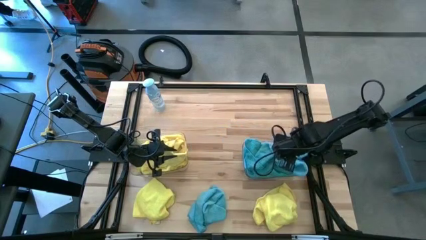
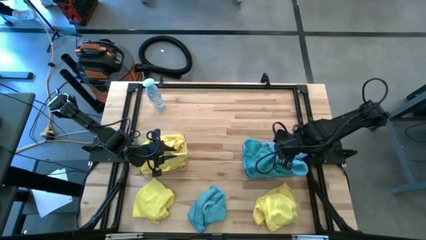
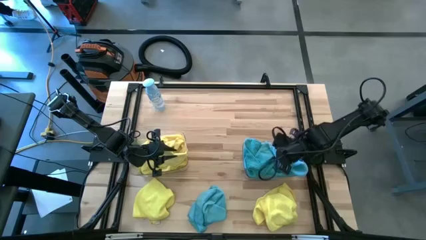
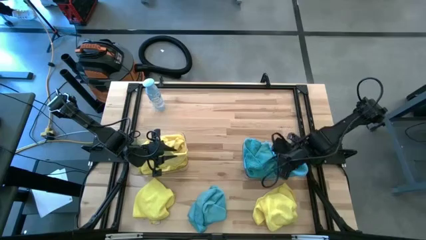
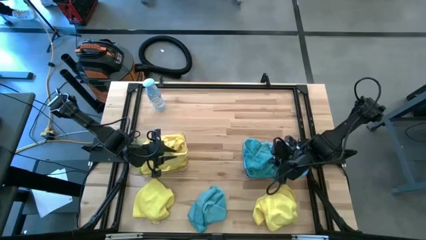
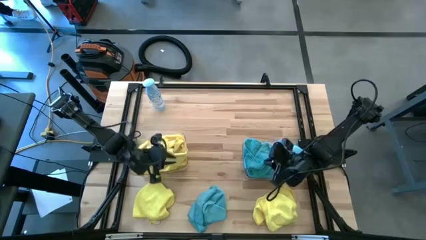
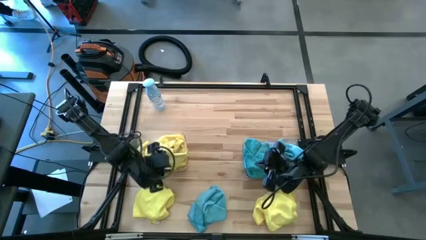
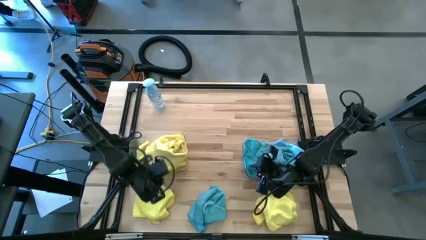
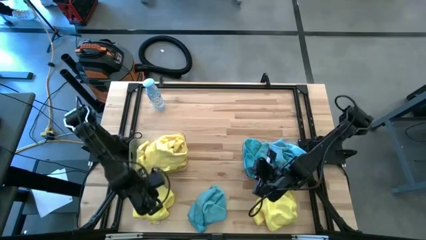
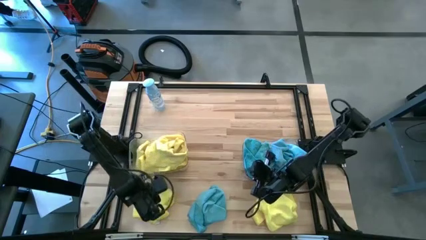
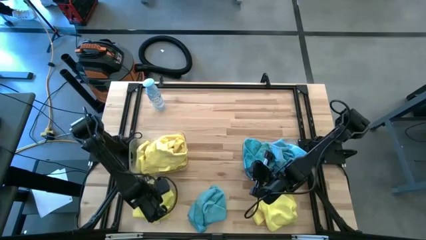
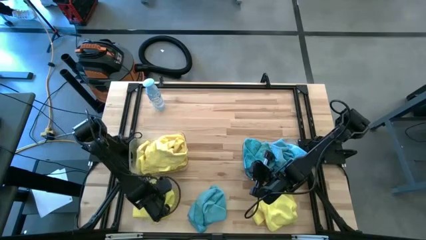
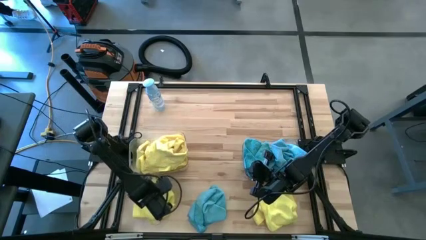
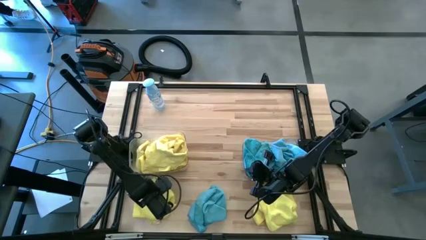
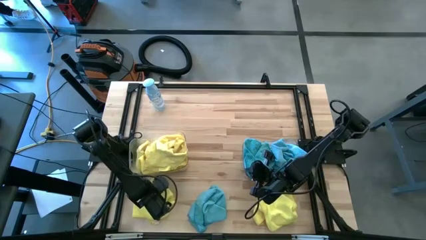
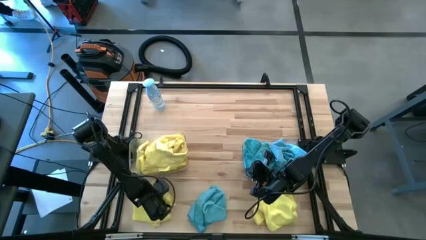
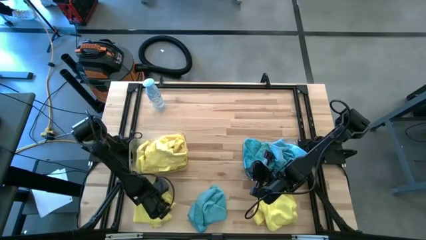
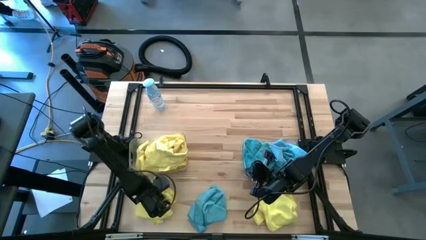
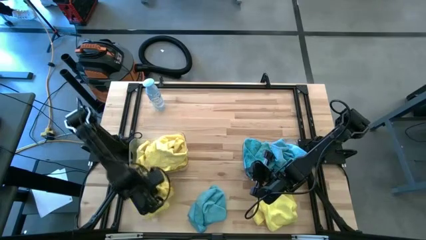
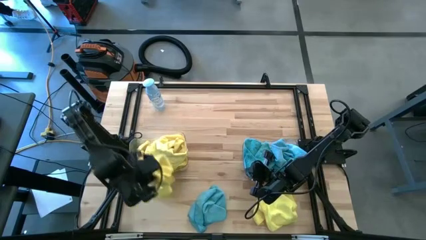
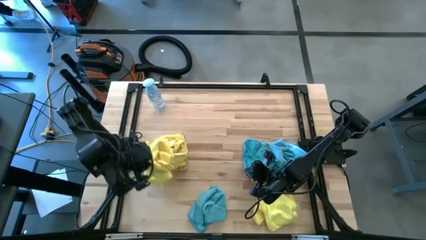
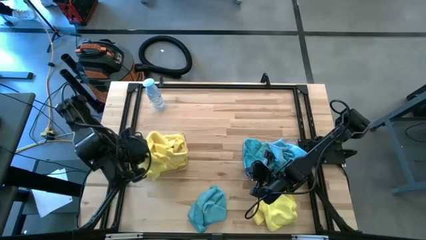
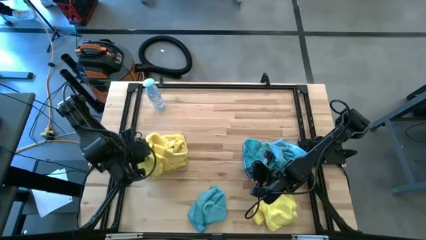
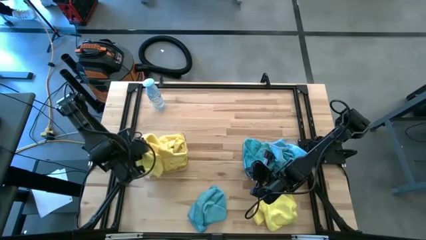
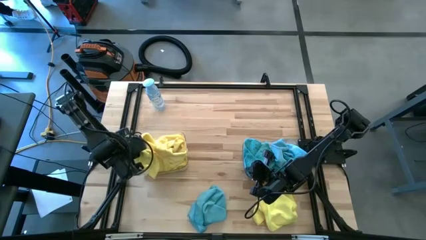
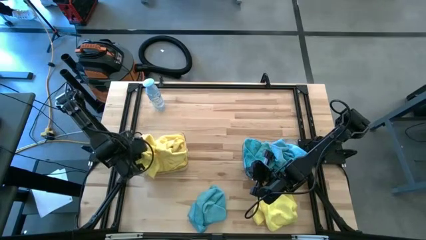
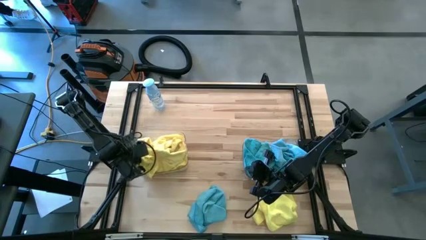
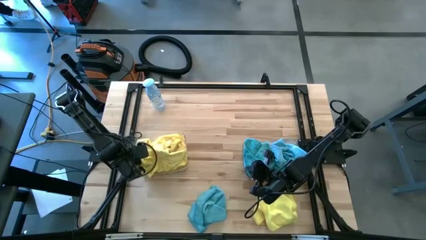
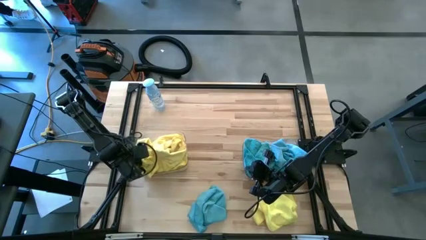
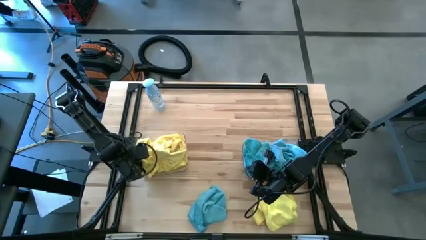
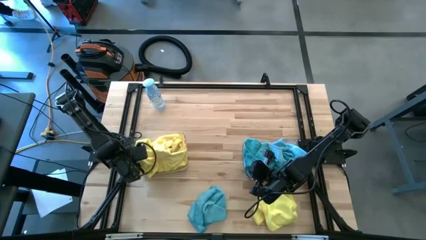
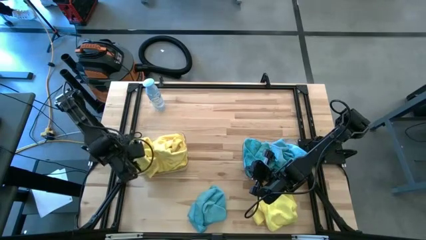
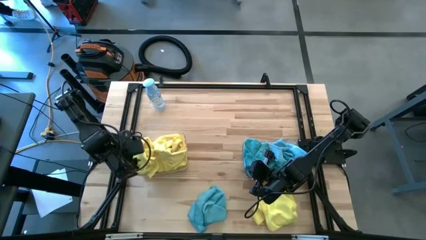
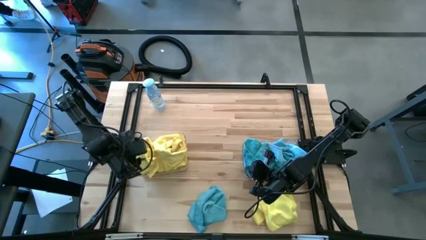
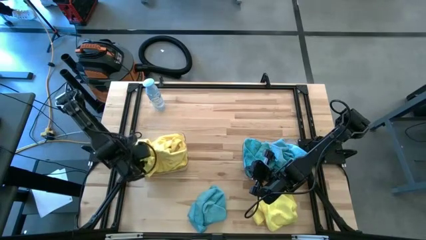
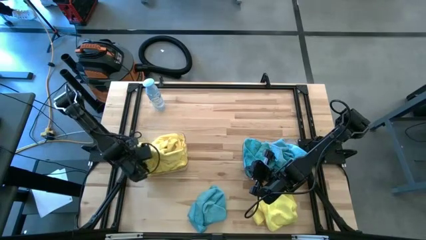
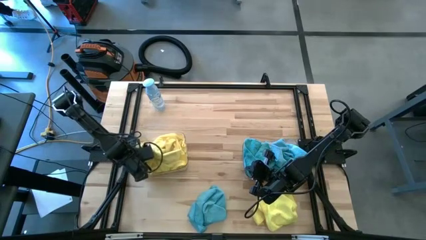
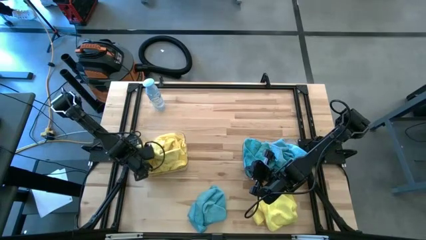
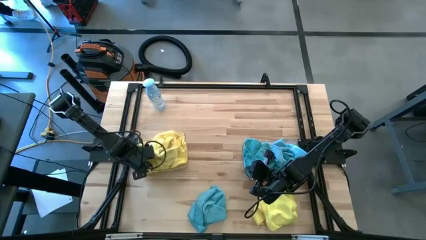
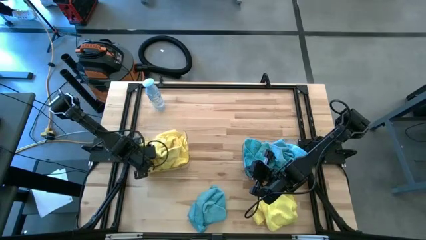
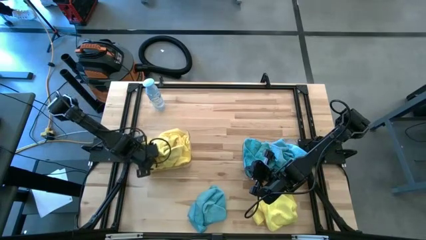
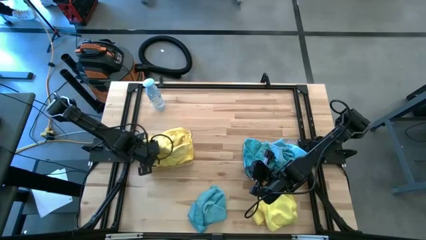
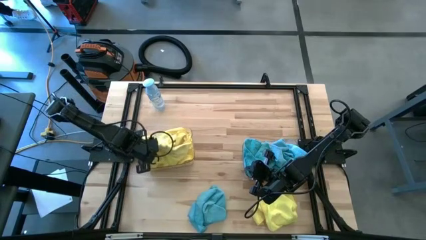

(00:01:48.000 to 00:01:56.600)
Task: Sort microfiber towel by color & place in baskets
Put the left yellow microfiber cloth into the left transparent bin

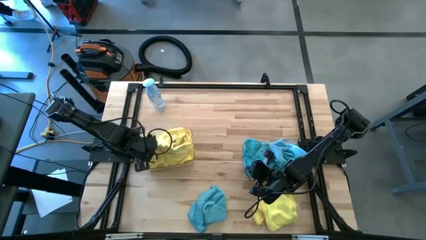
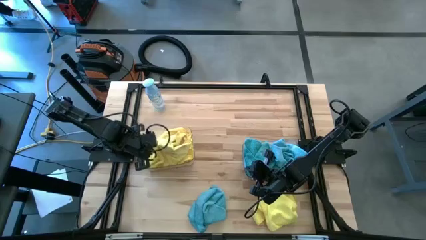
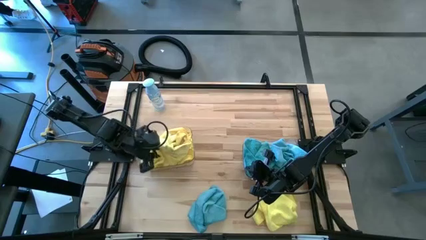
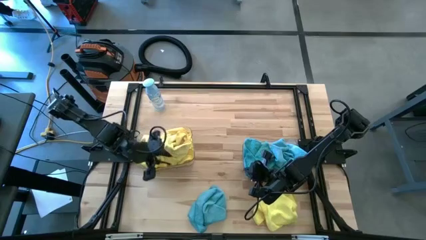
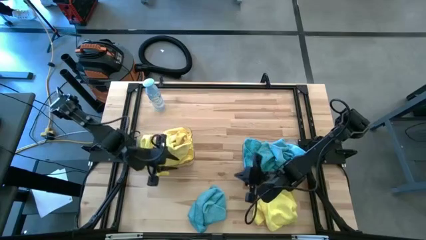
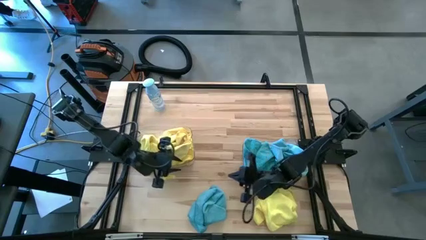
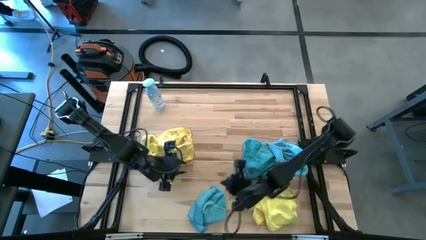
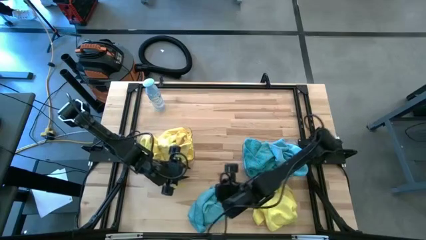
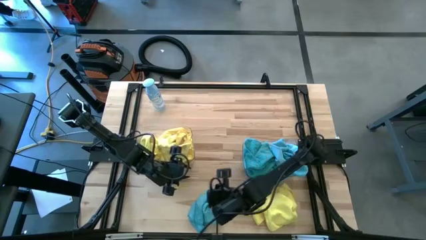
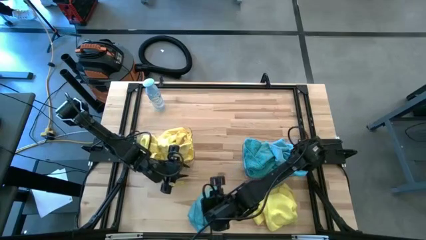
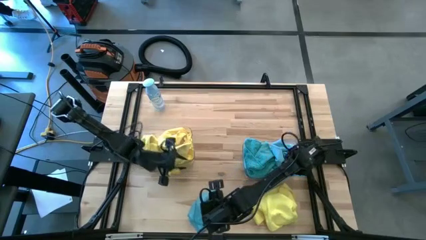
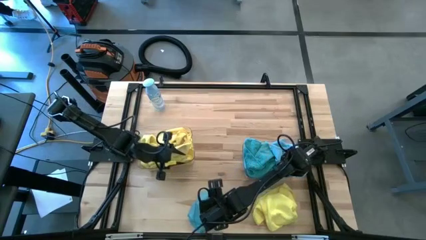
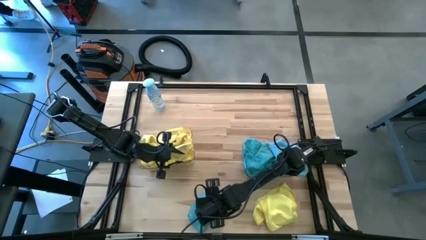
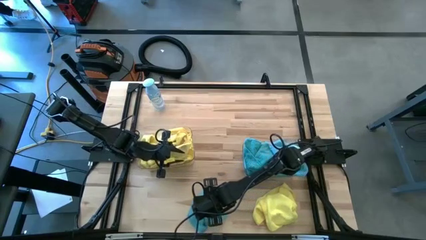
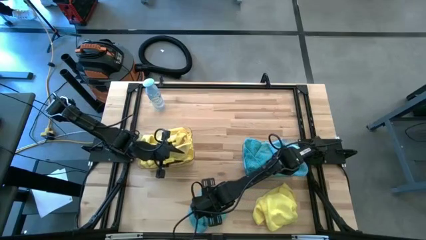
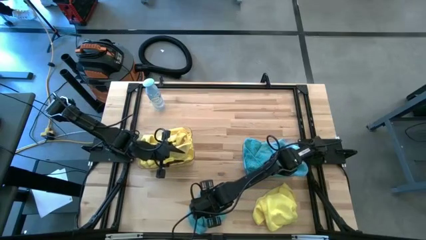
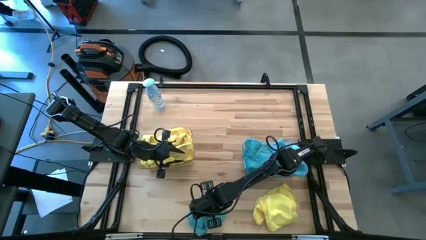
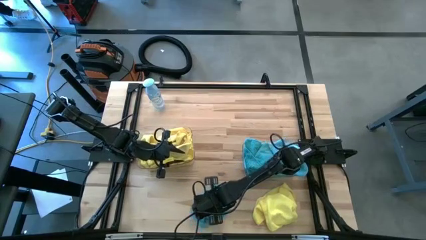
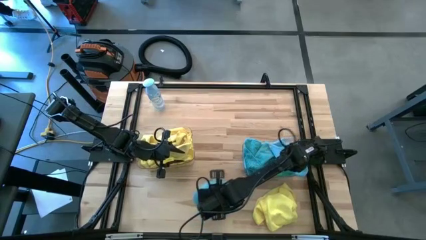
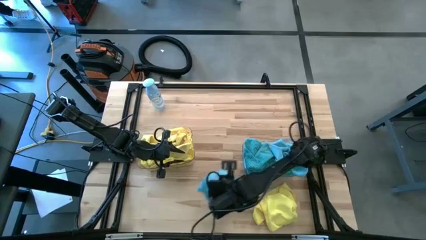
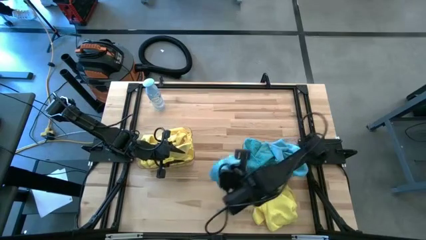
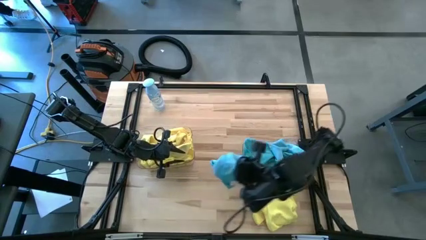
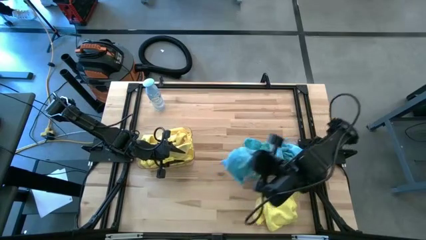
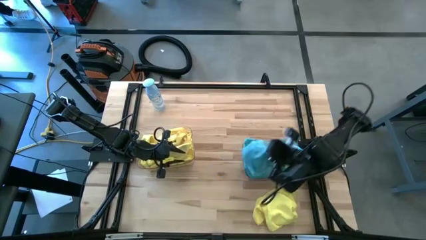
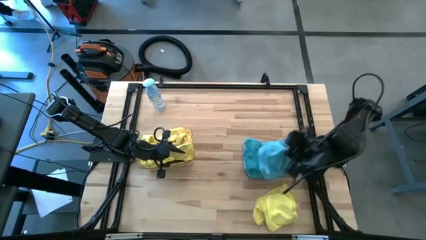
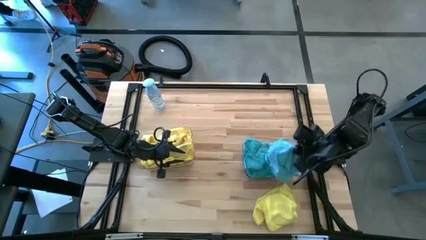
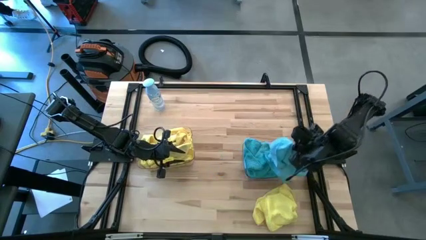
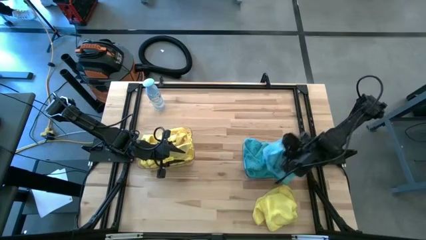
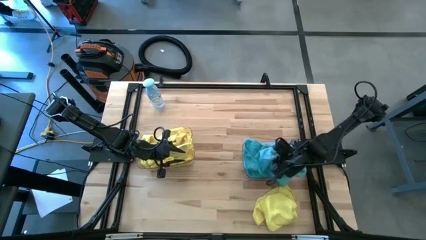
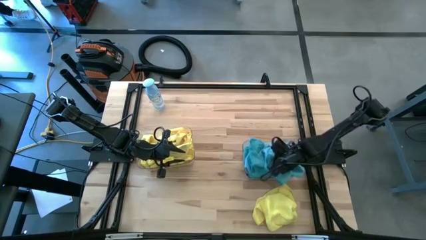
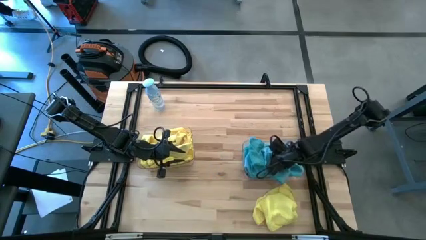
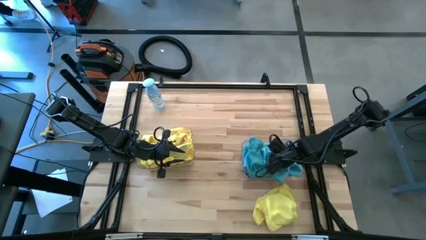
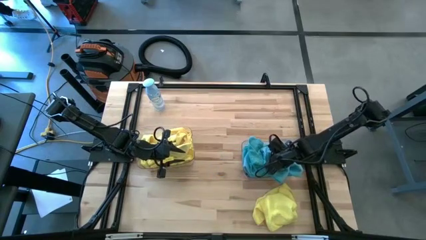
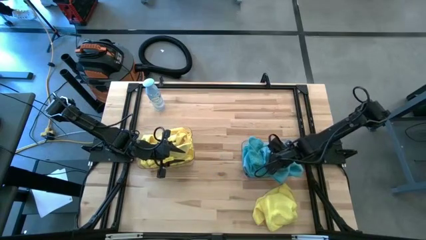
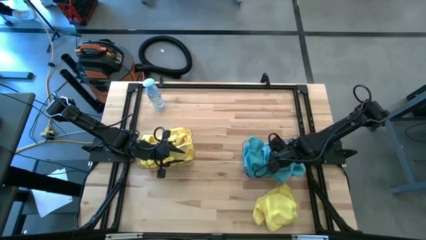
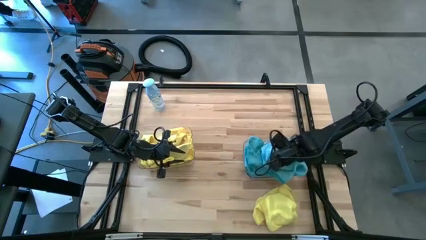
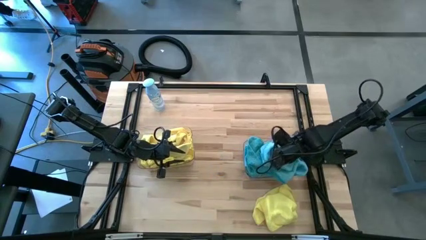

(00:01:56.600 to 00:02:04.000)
Put the blue microfiber cloth into the right transparent bin
